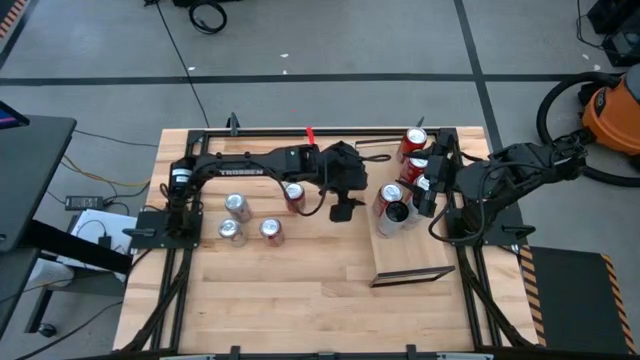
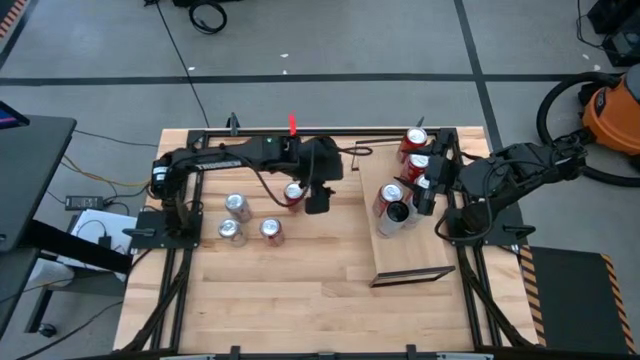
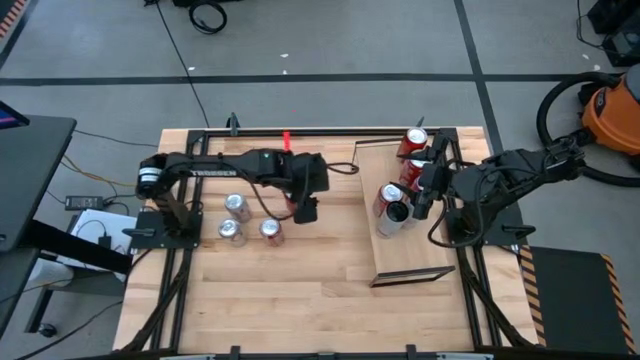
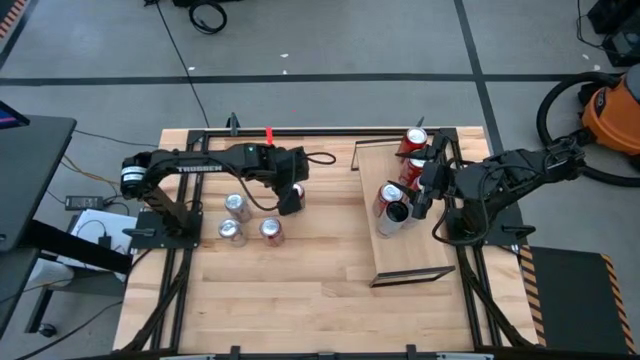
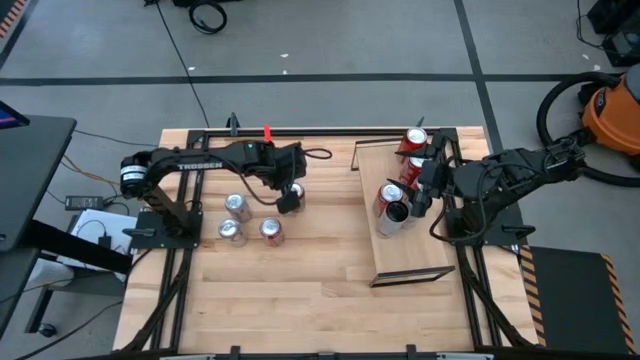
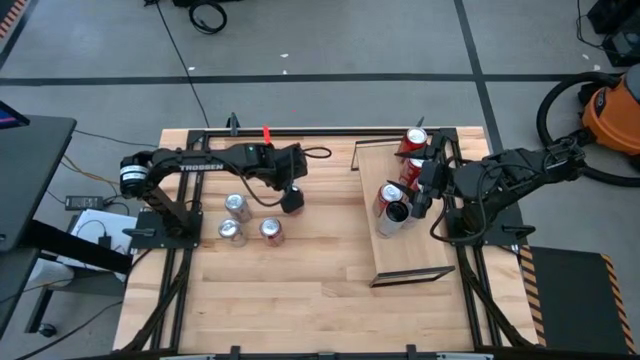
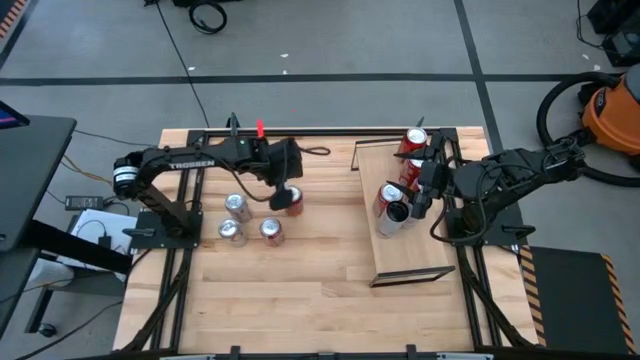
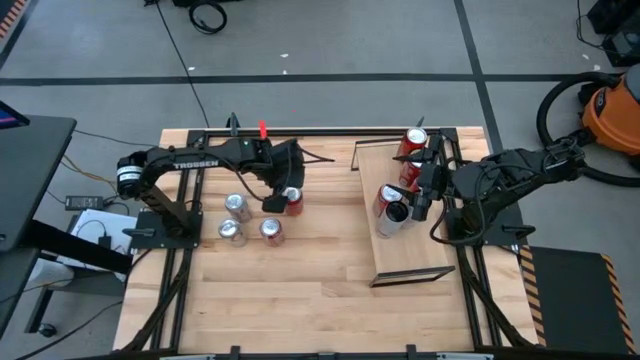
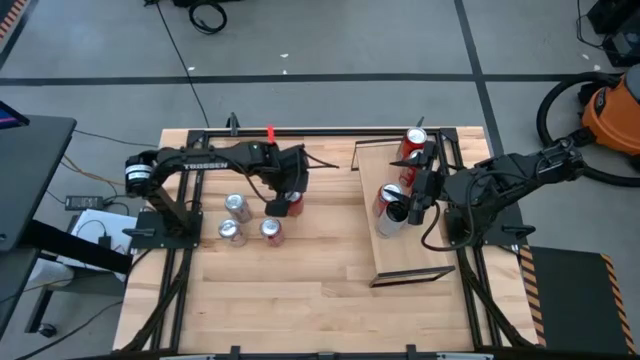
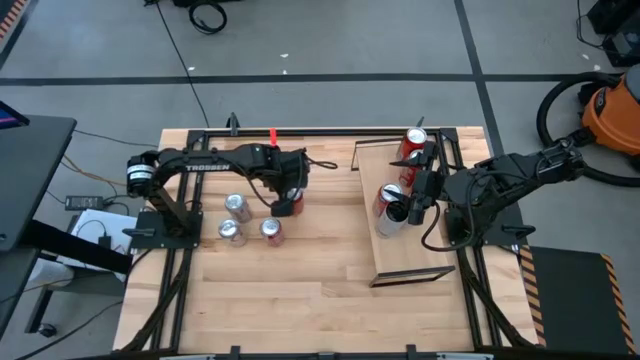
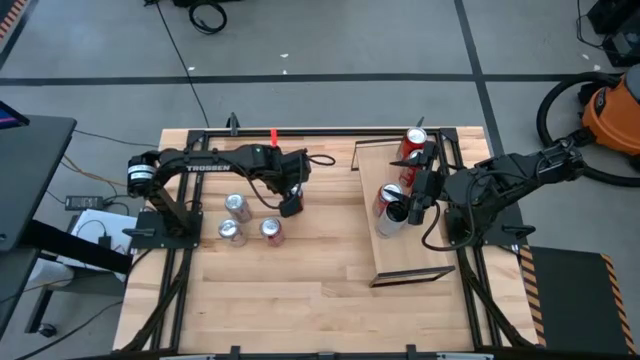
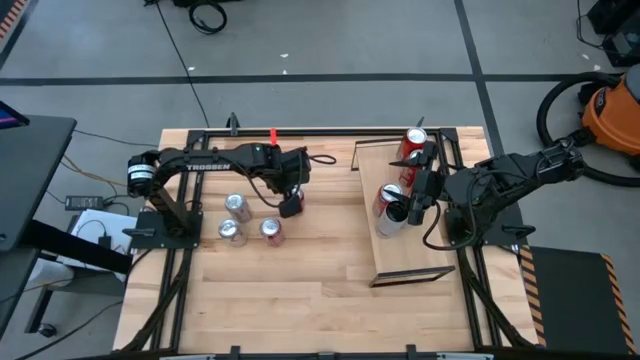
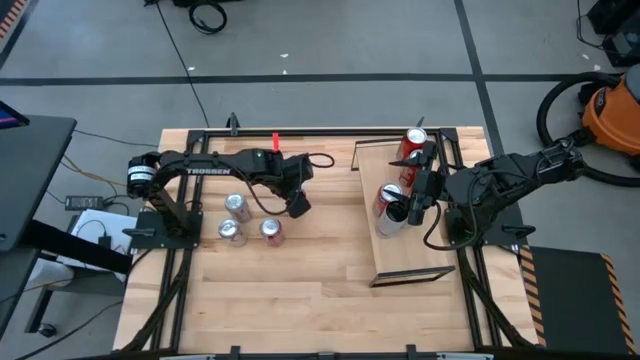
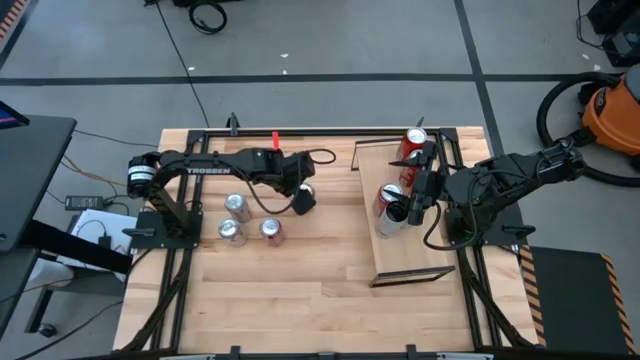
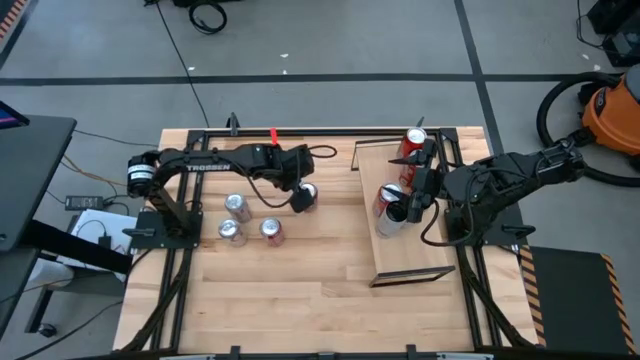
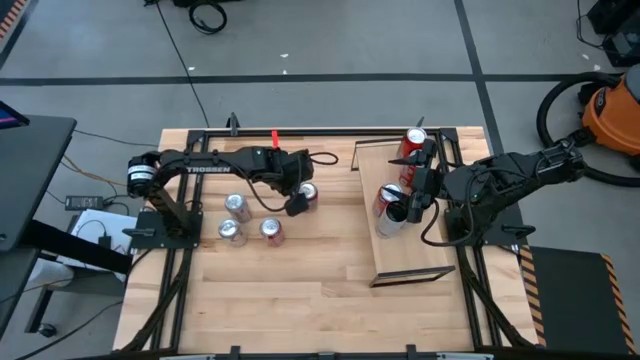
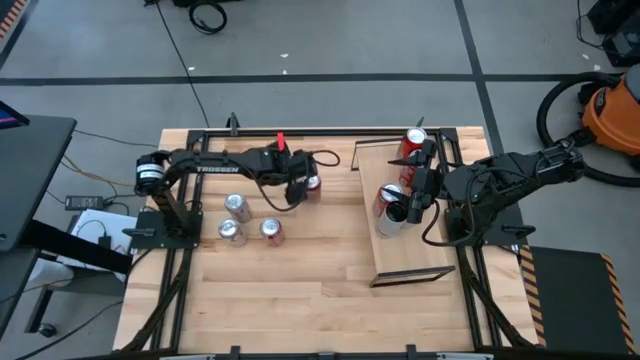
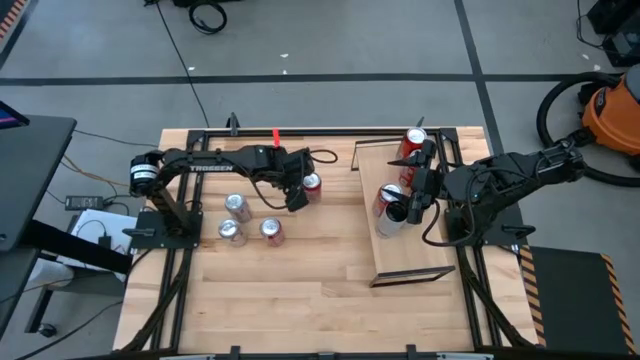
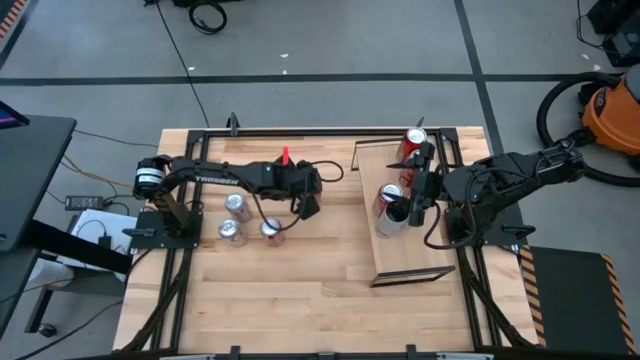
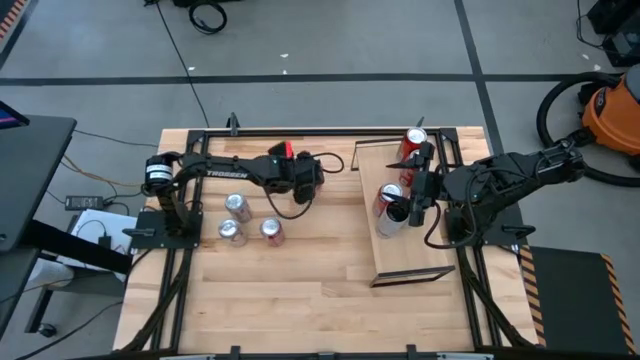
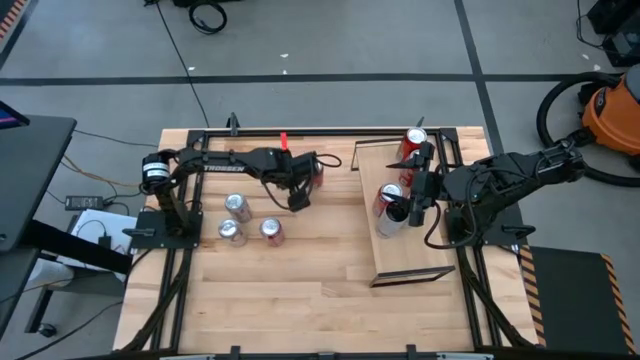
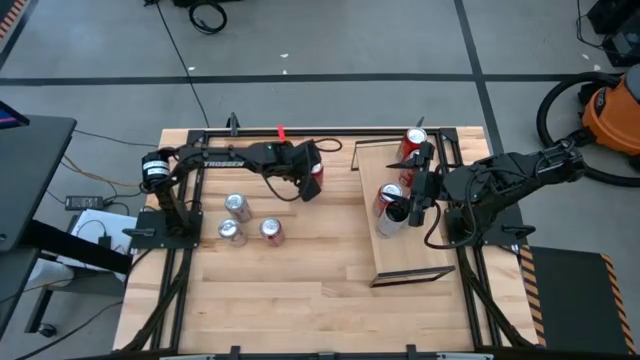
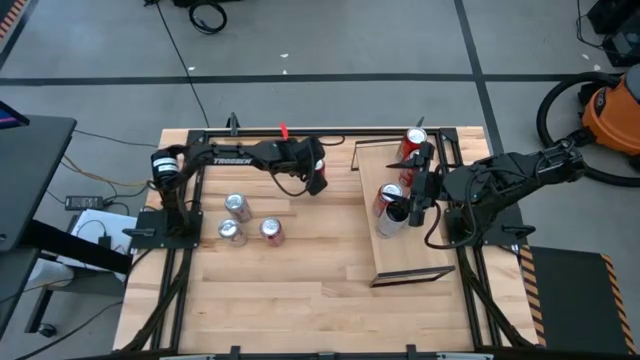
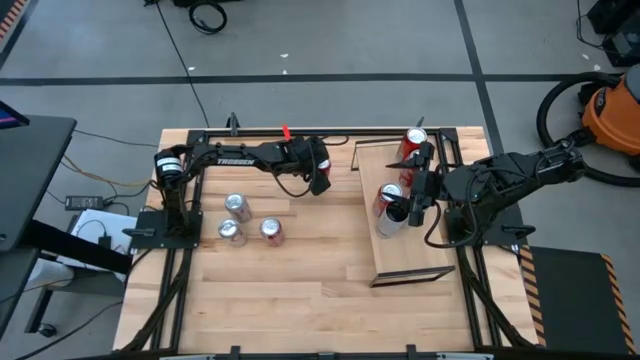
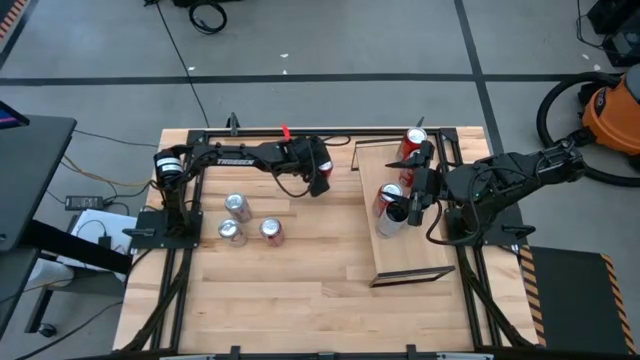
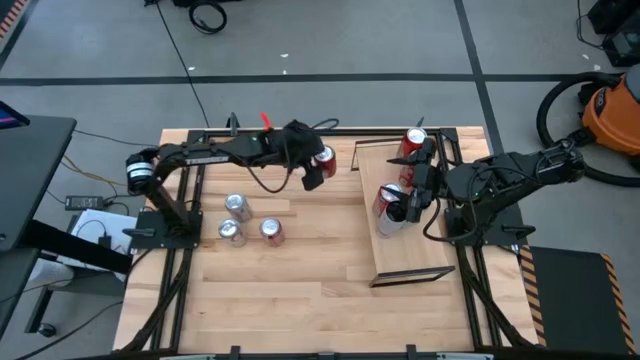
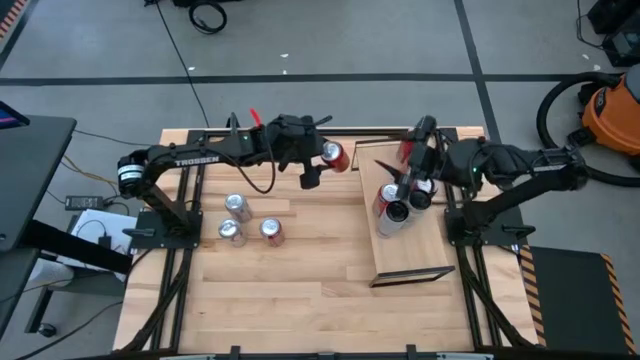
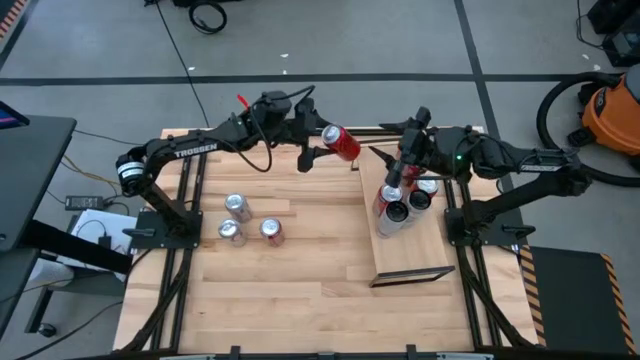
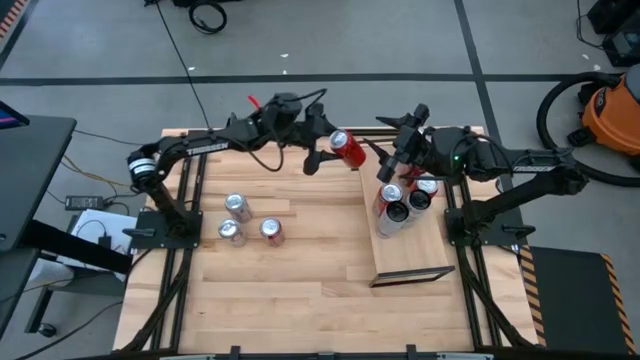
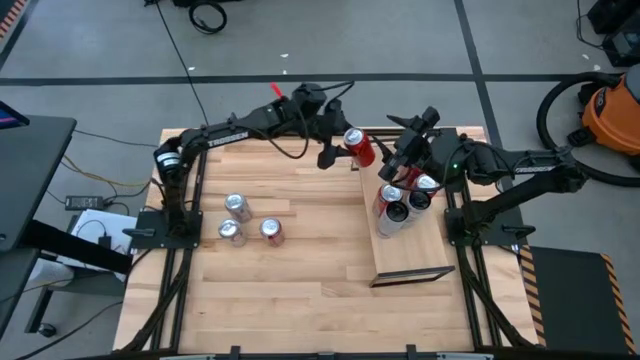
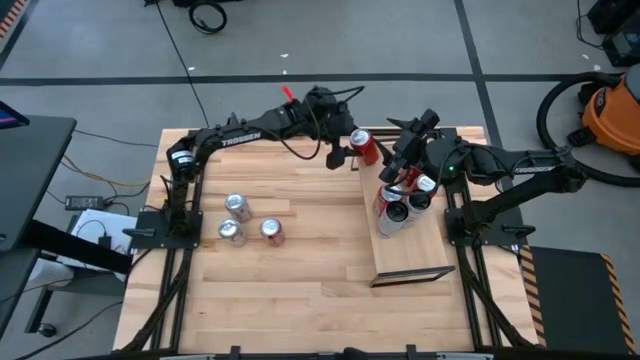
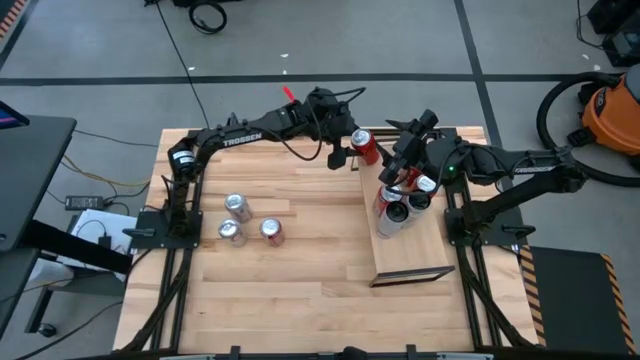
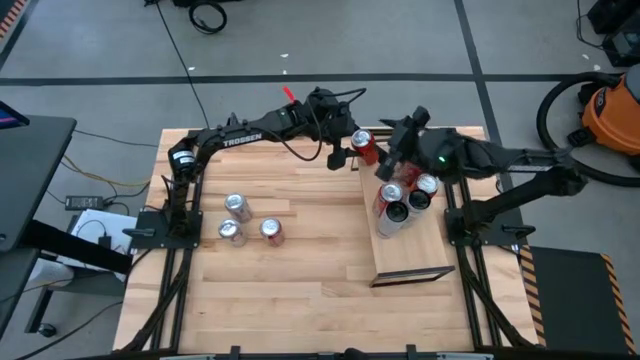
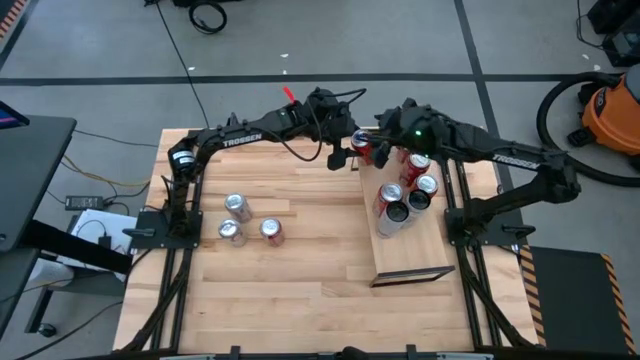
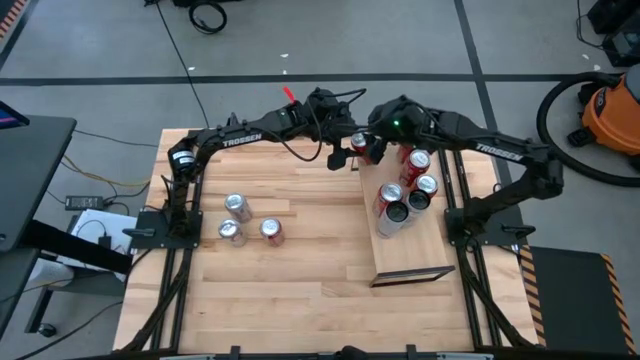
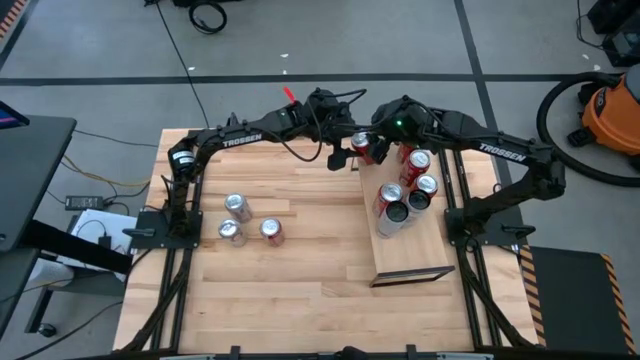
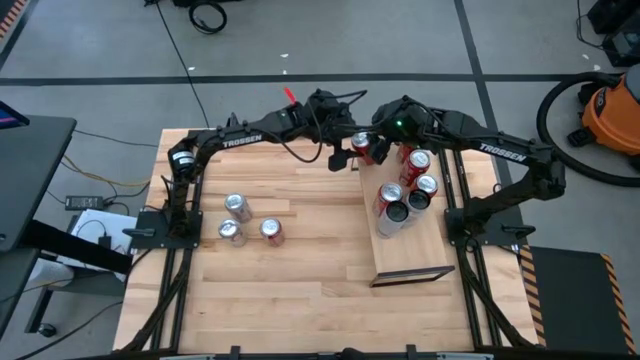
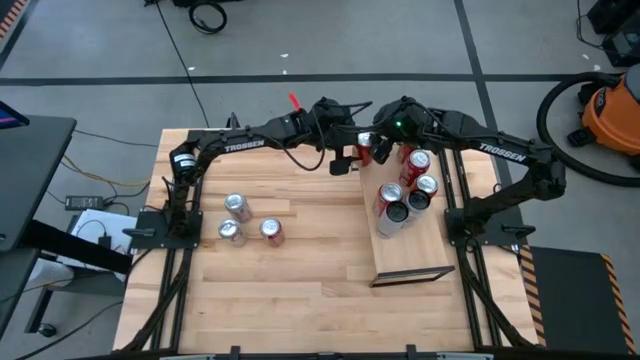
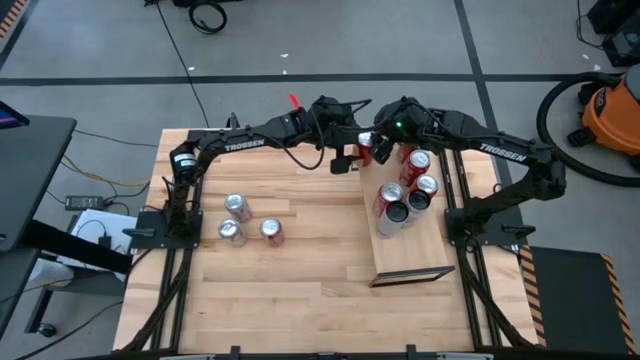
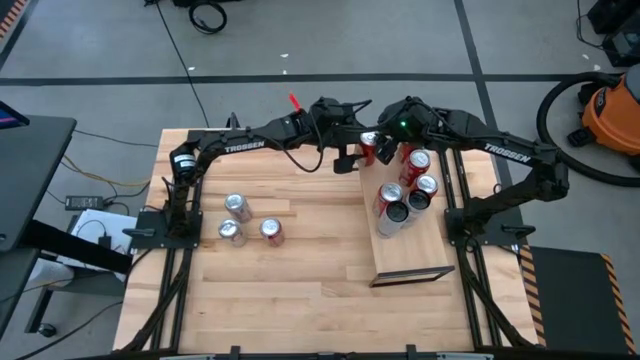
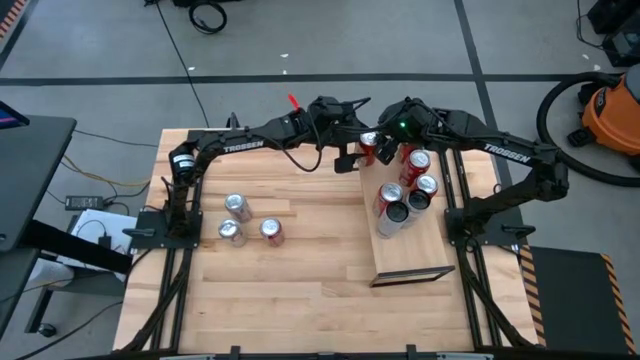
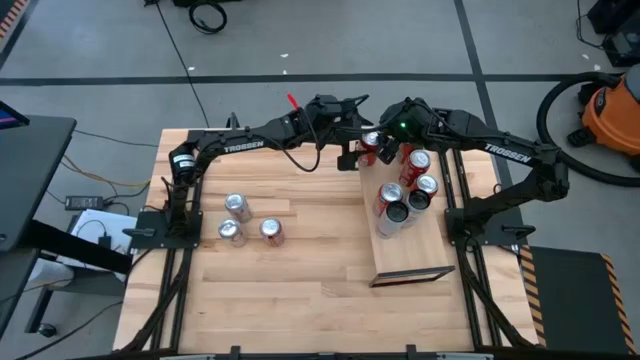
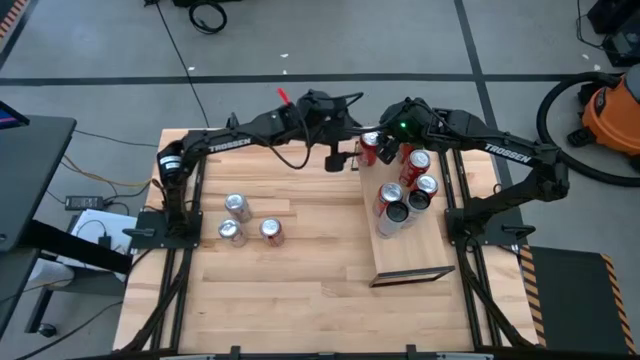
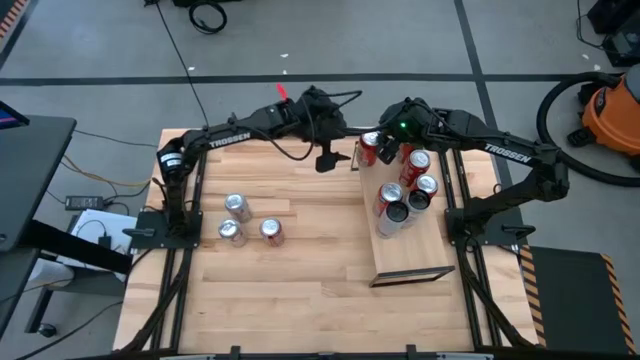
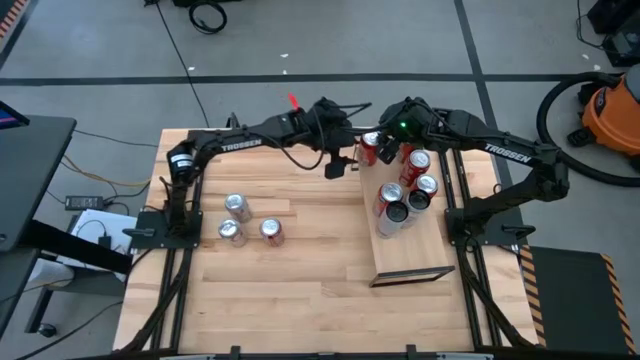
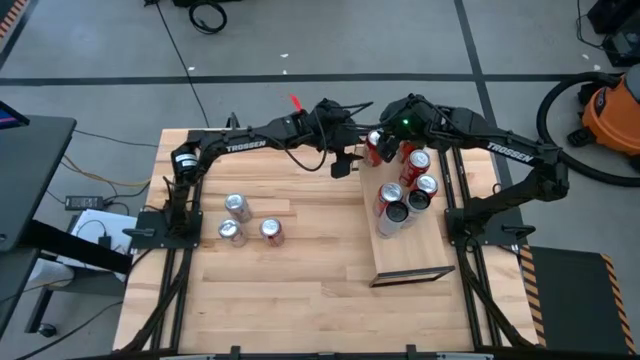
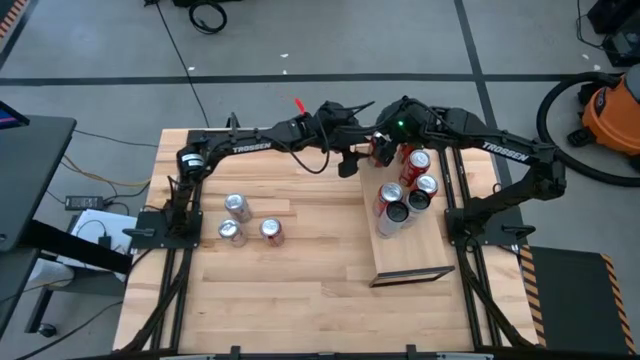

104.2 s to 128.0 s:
Task: Place canned beverage on shelf
Put the red black soda can on the shelf aligned with the other red black soda can
